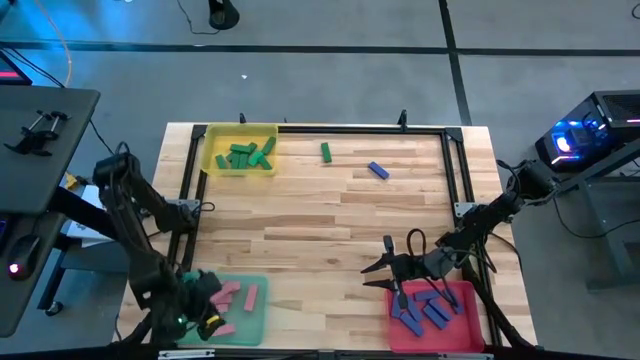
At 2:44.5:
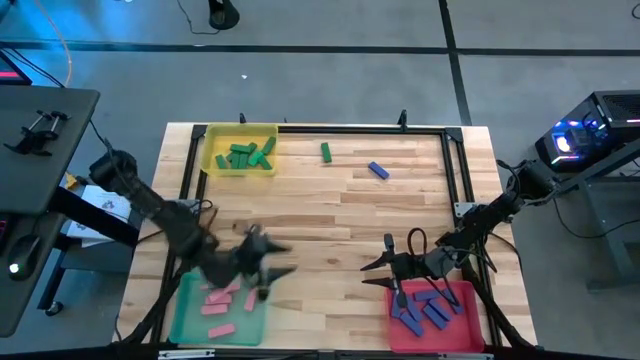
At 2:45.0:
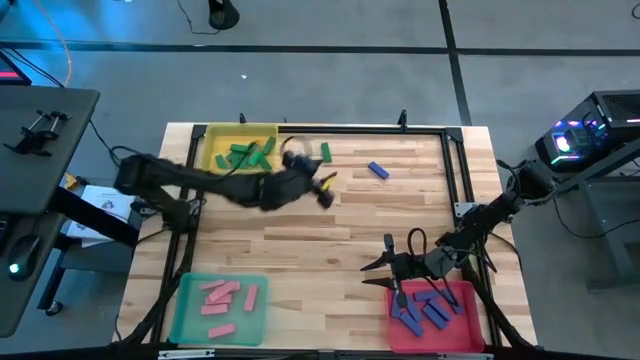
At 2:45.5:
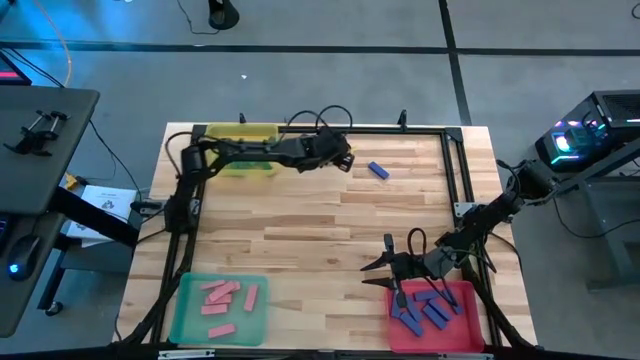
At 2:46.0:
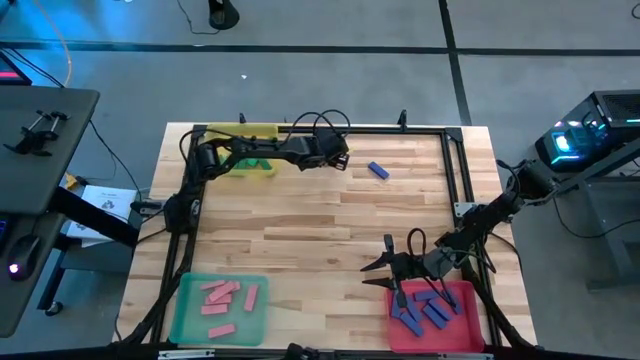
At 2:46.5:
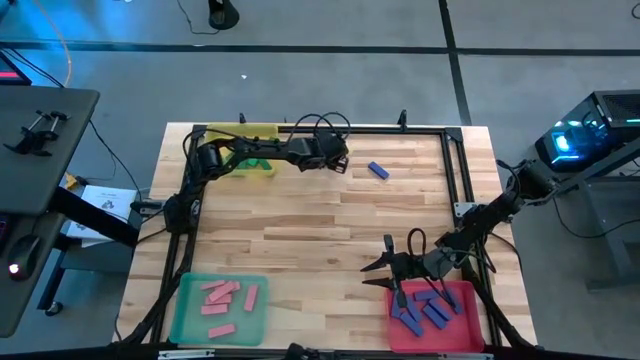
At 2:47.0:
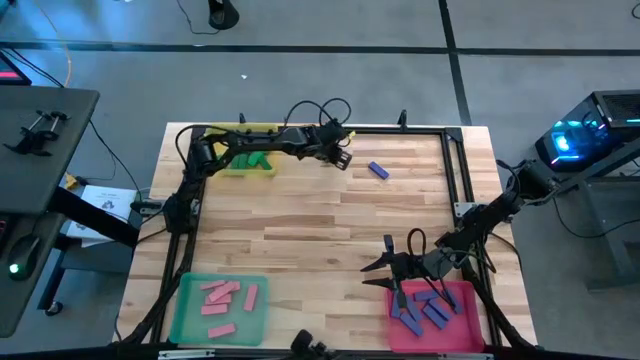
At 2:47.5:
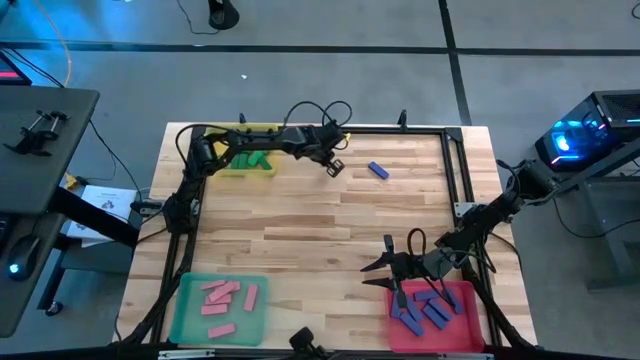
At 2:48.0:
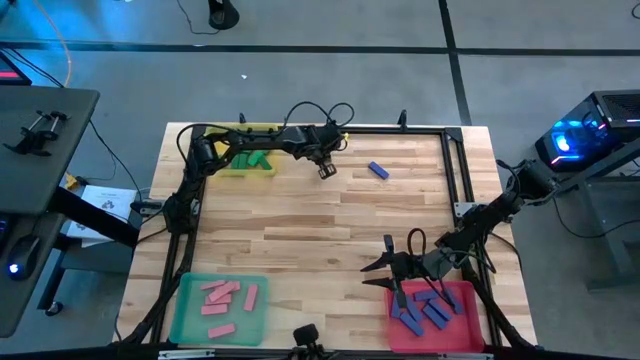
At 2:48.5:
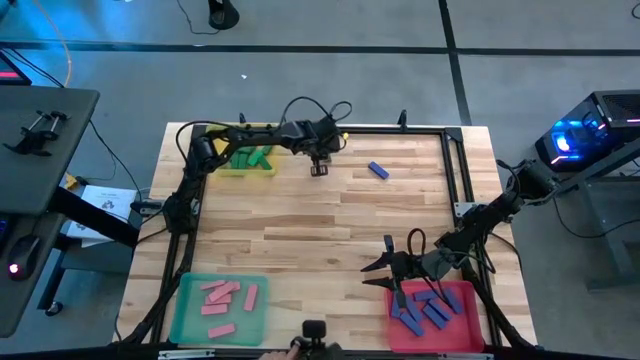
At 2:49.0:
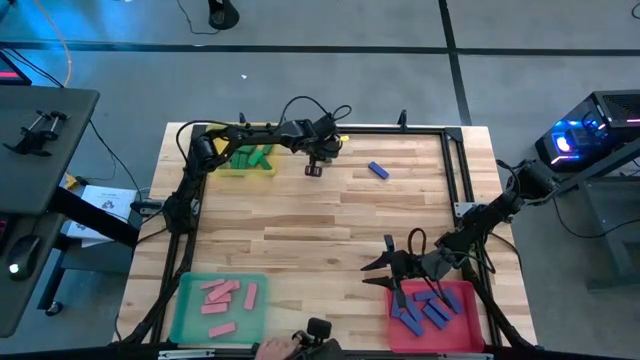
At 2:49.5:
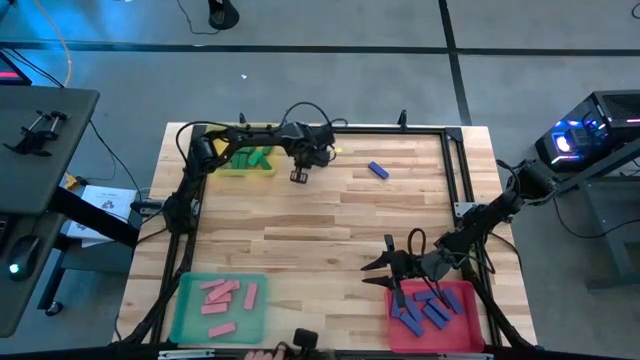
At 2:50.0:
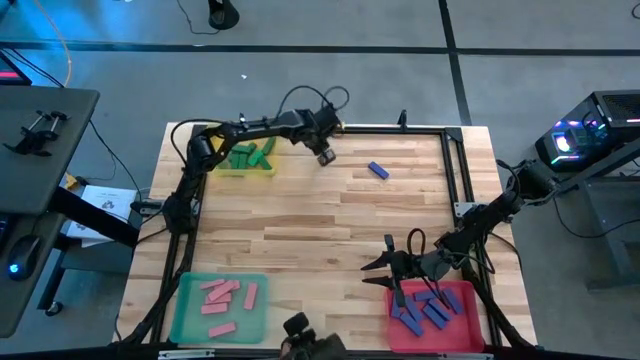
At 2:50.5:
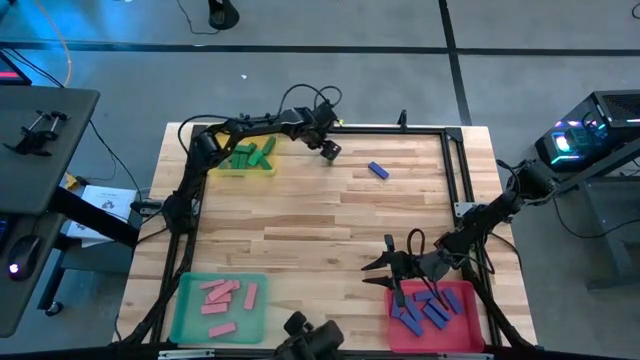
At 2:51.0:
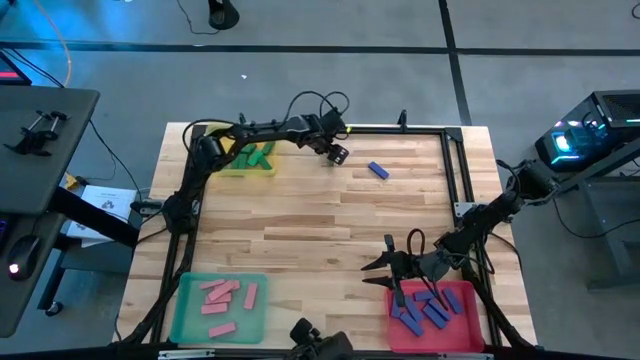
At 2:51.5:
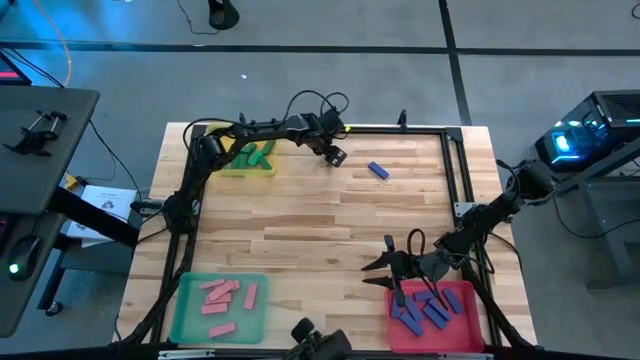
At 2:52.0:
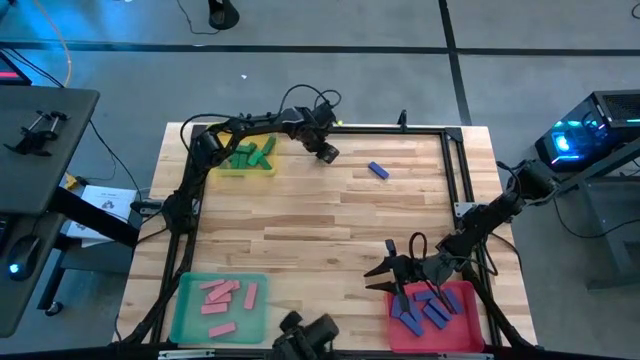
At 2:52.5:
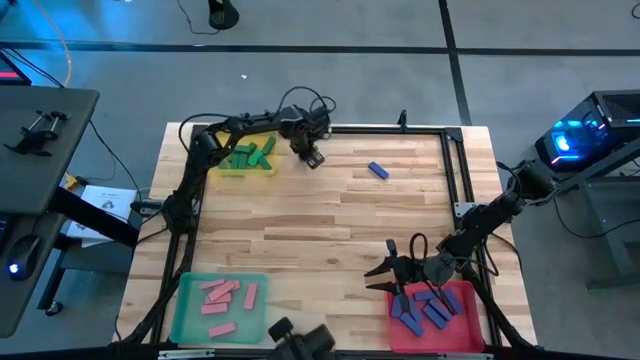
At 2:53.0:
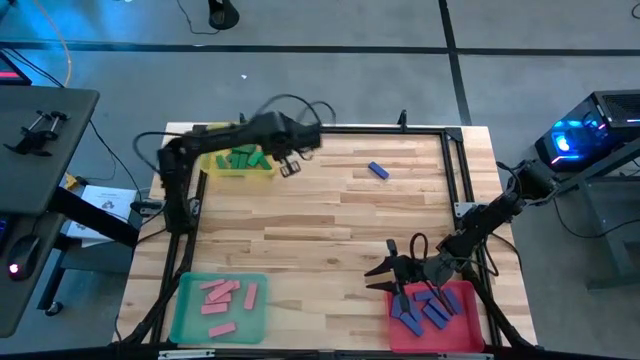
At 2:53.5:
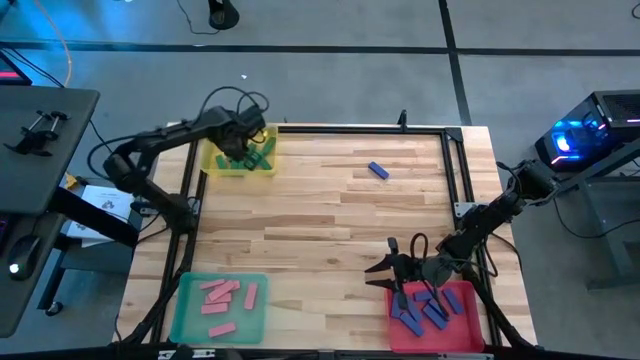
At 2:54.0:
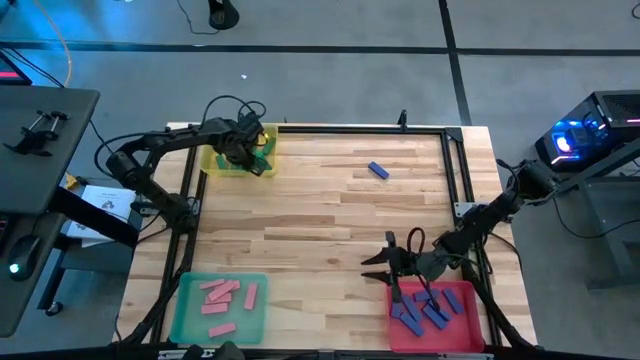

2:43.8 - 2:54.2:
Task: Sort blocks
Put the green block into the yellow bin

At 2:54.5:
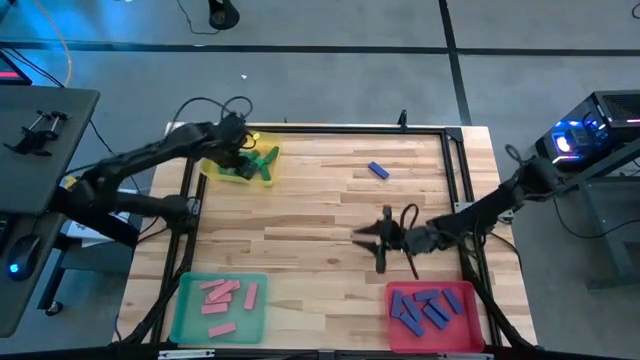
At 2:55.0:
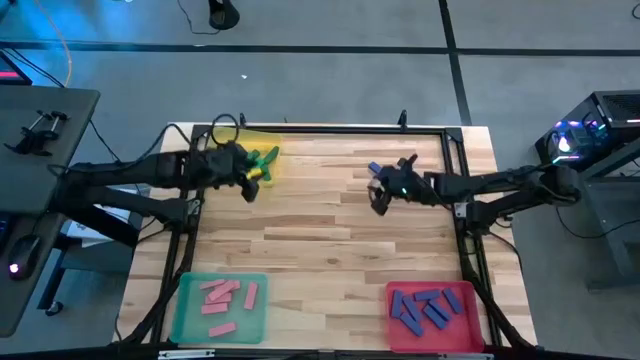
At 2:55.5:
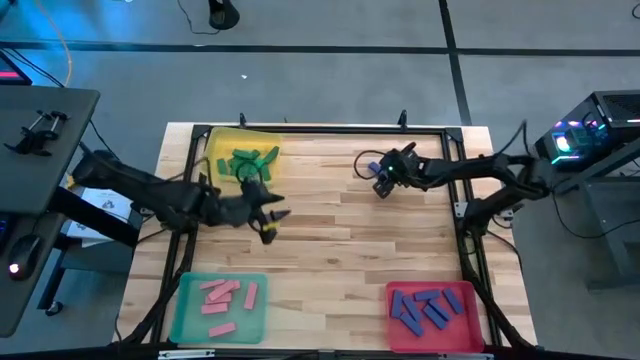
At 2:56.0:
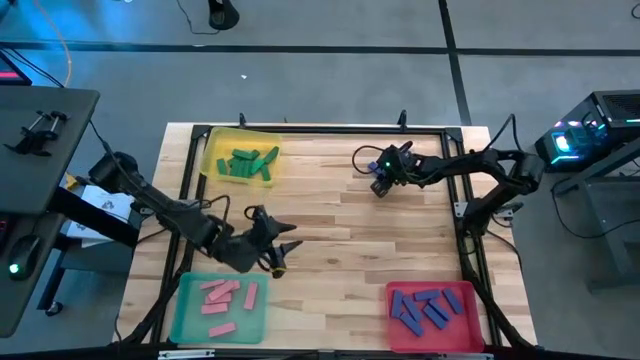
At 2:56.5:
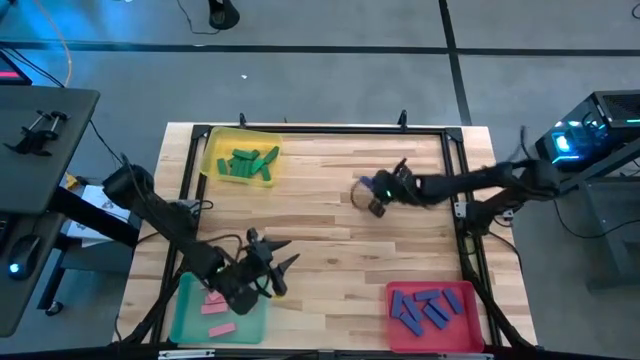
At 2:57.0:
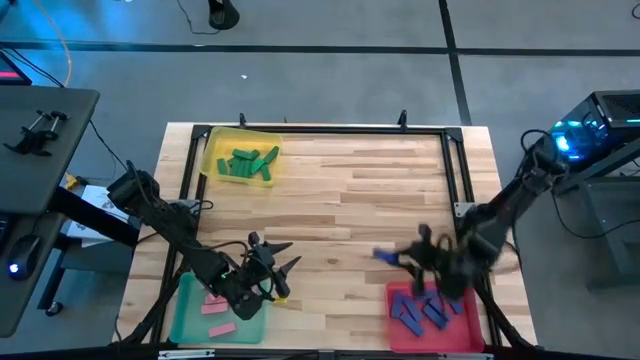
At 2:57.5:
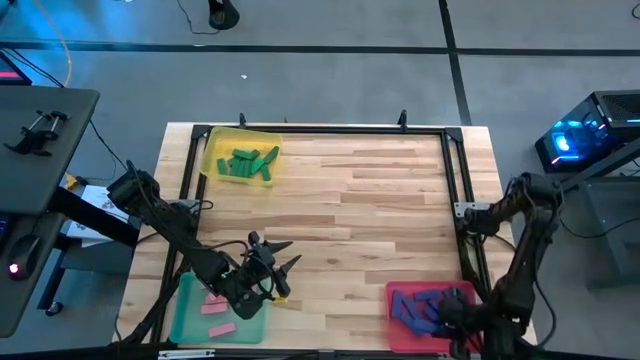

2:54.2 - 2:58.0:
Put the violet block into the pink bin

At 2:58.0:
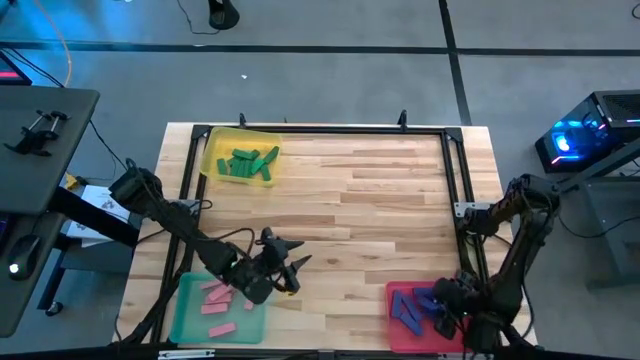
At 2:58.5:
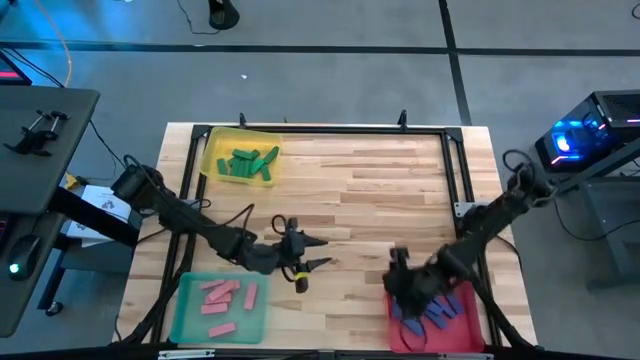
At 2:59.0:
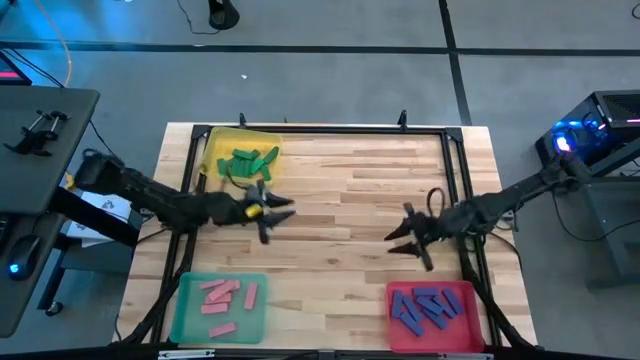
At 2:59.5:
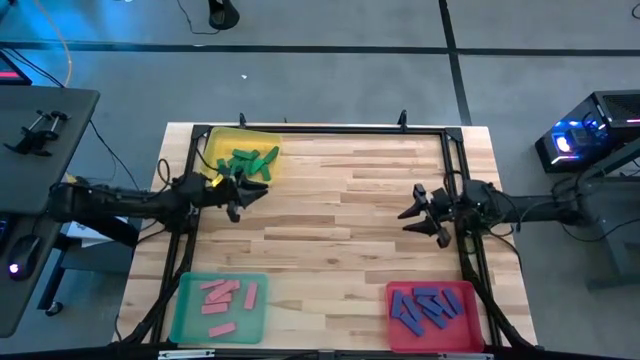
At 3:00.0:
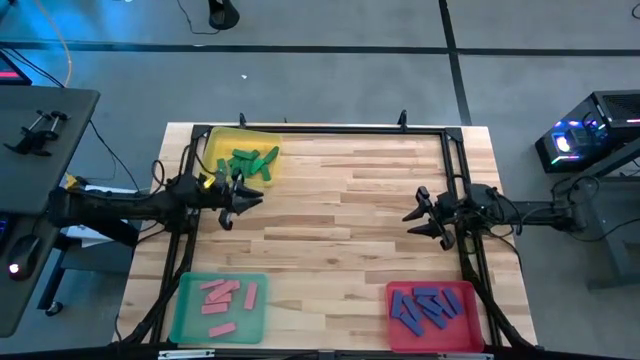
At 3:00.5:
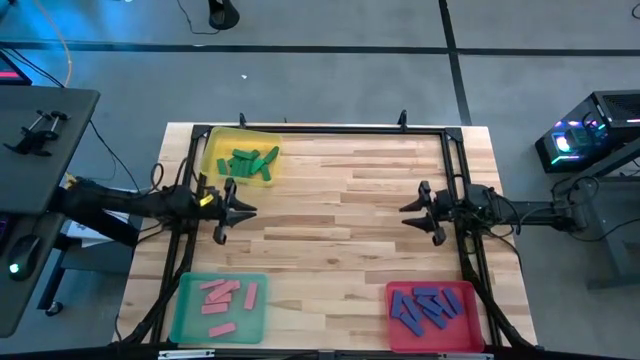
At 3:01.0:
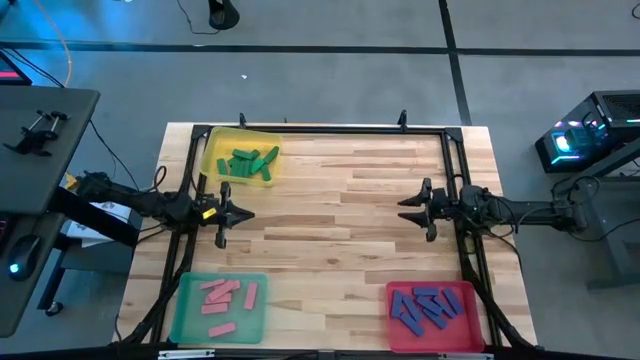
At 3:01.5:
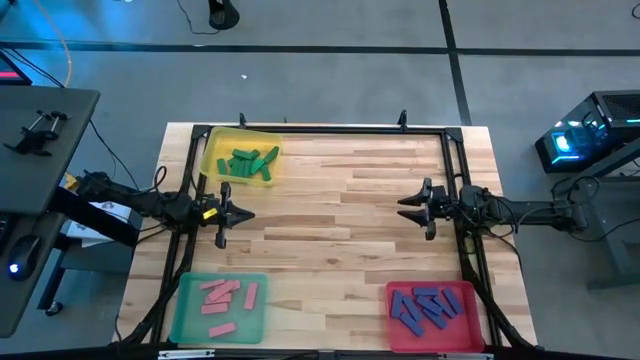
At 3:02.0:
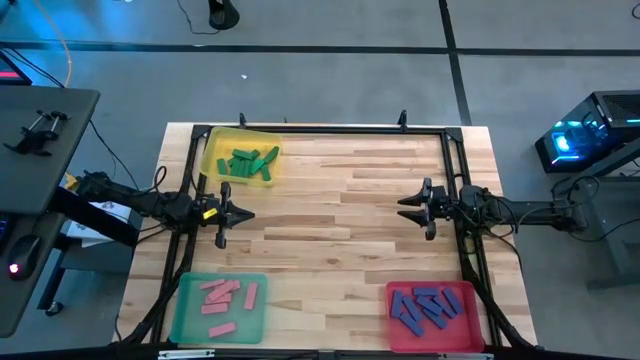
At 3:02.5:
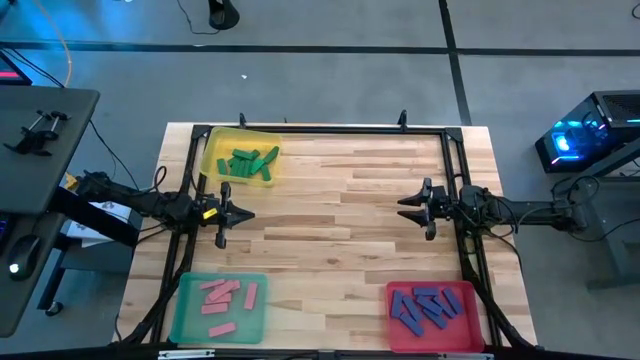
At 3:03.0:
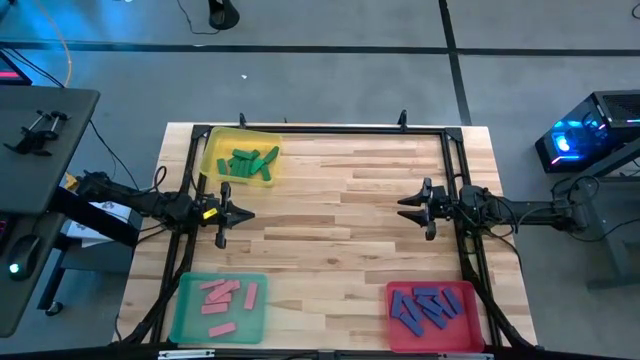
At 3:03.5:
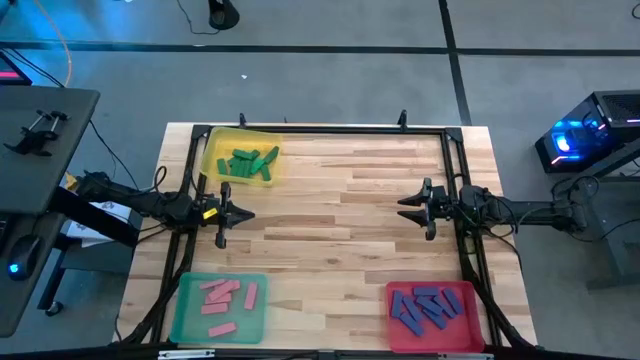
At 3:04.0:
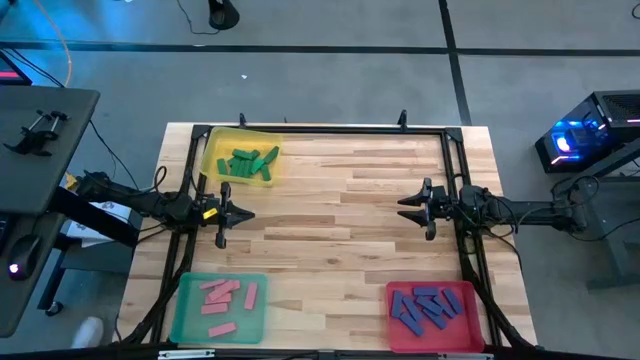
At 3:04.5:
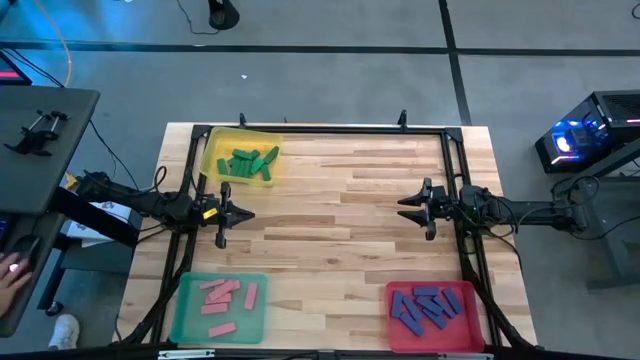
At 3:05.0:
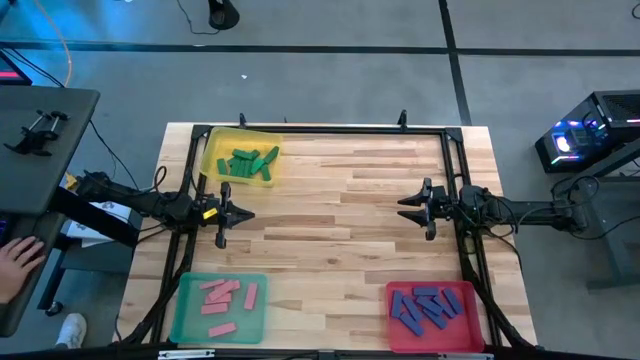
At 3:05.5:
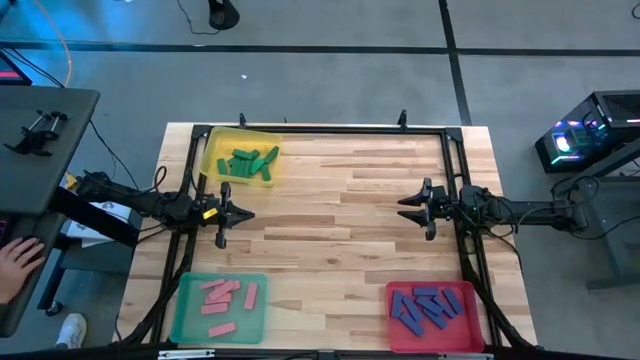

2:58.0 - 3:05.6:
Return to Home Position
